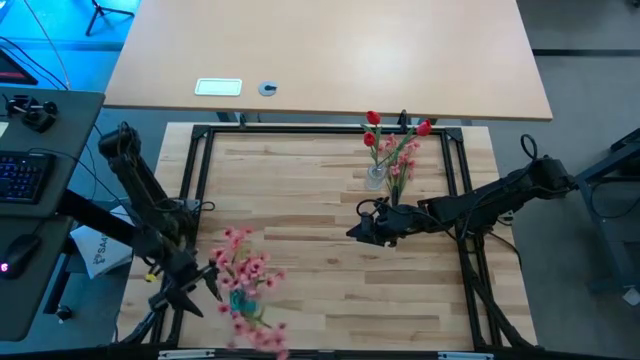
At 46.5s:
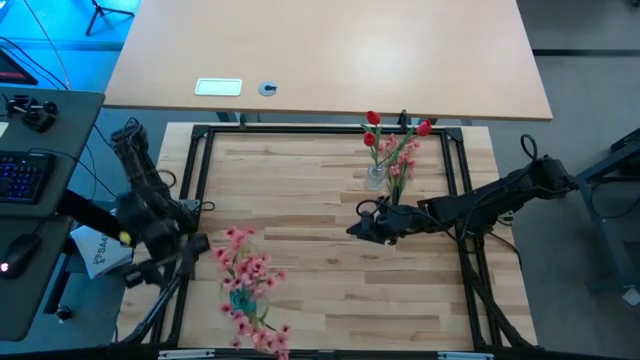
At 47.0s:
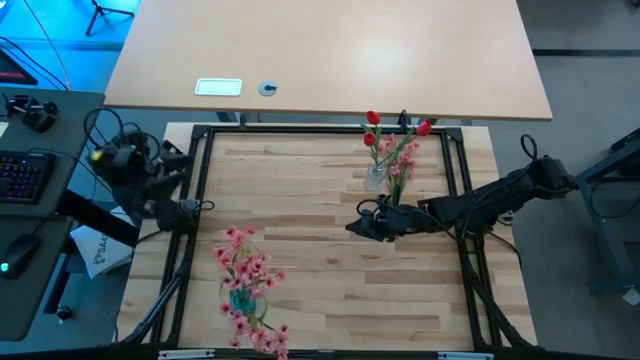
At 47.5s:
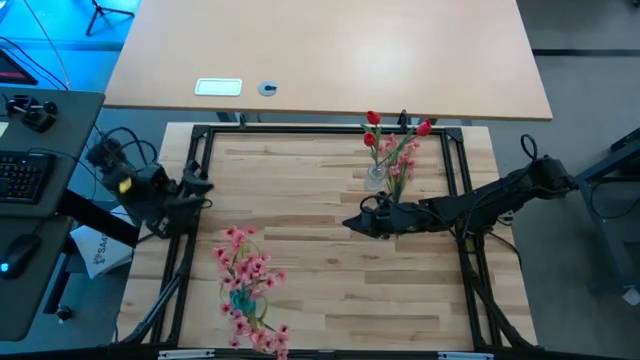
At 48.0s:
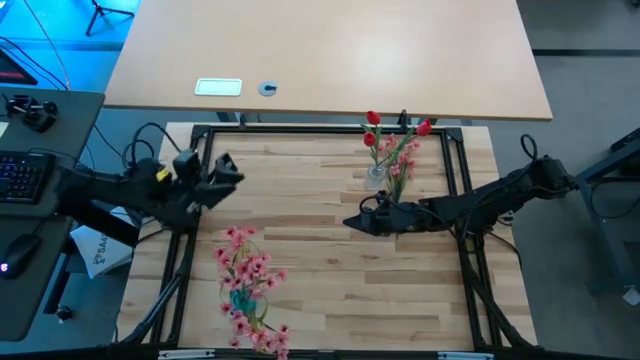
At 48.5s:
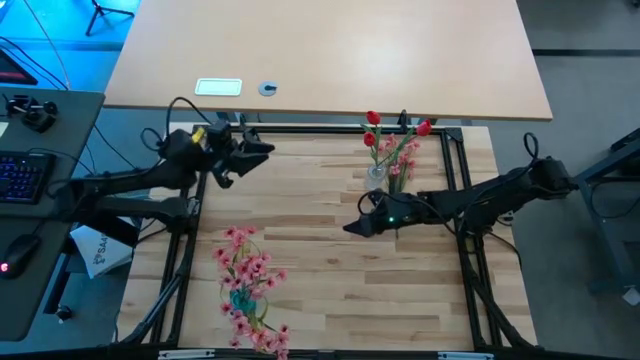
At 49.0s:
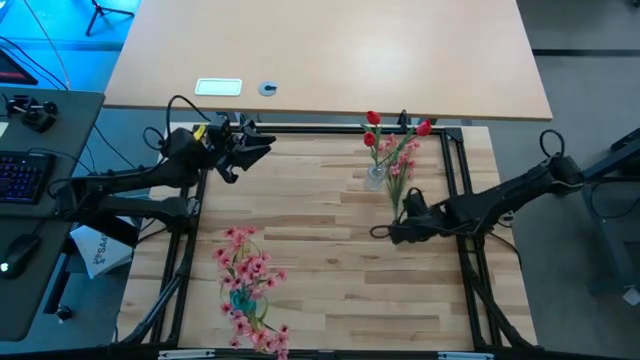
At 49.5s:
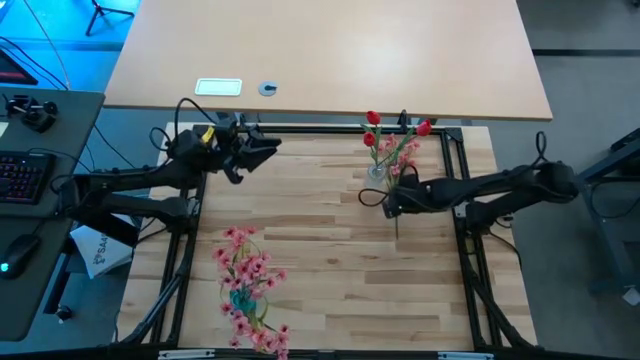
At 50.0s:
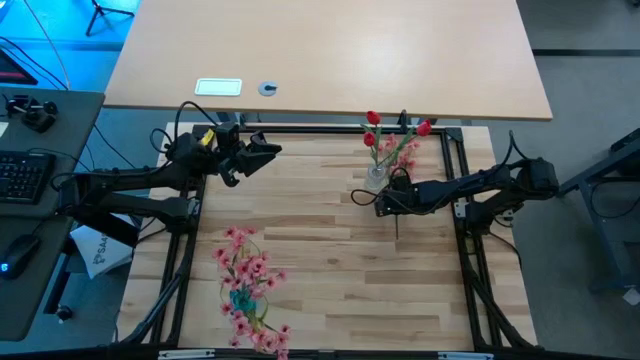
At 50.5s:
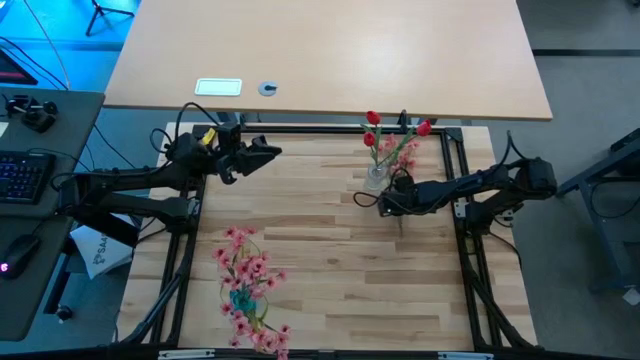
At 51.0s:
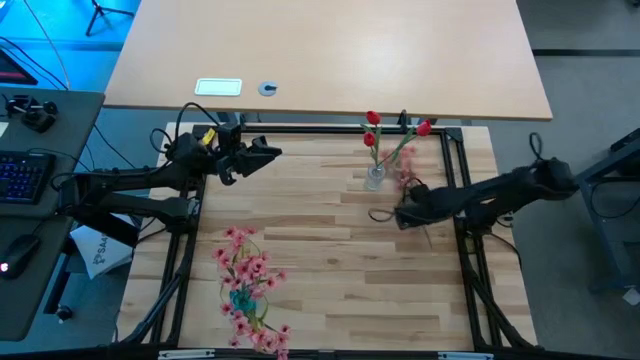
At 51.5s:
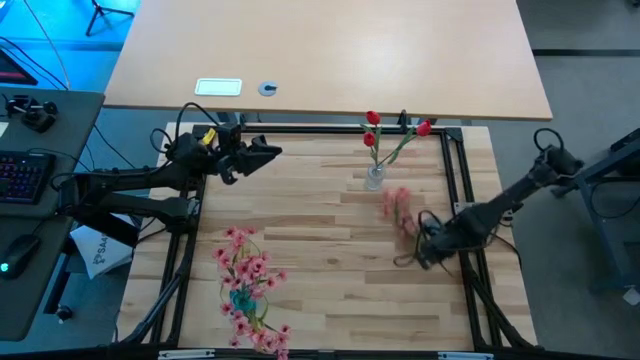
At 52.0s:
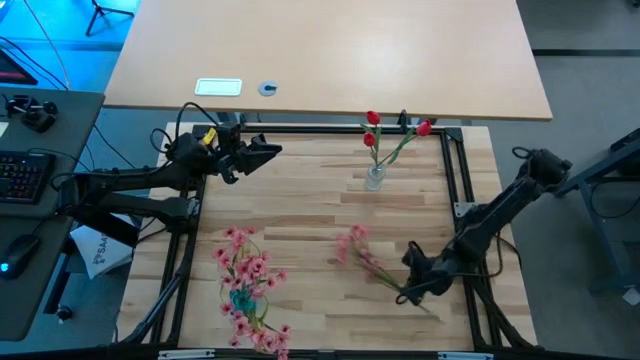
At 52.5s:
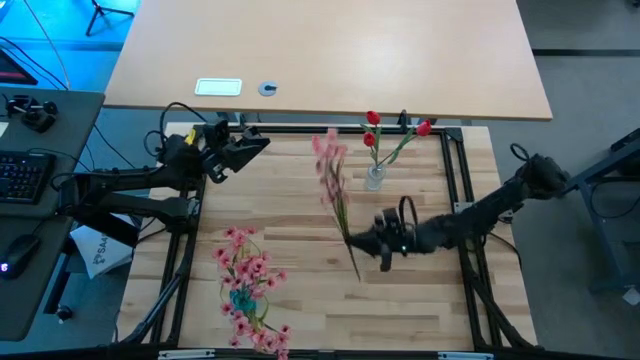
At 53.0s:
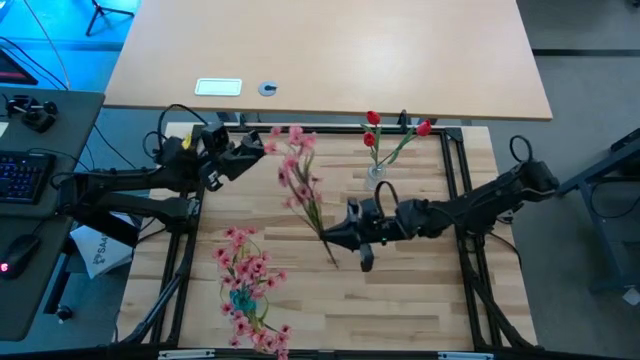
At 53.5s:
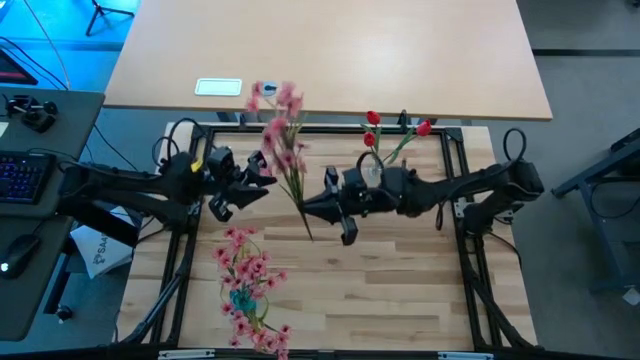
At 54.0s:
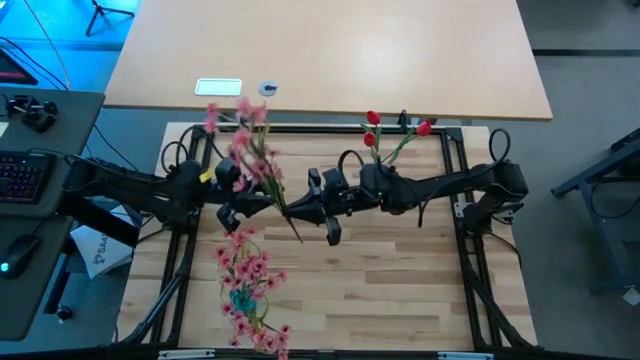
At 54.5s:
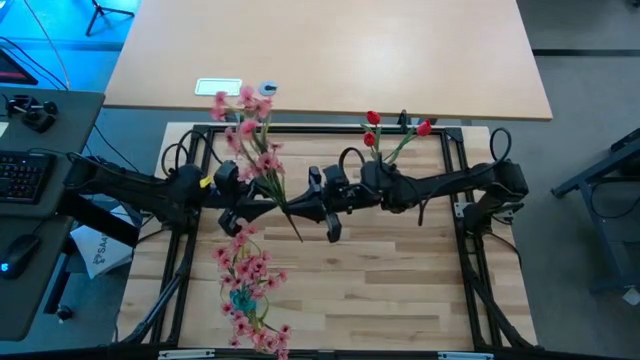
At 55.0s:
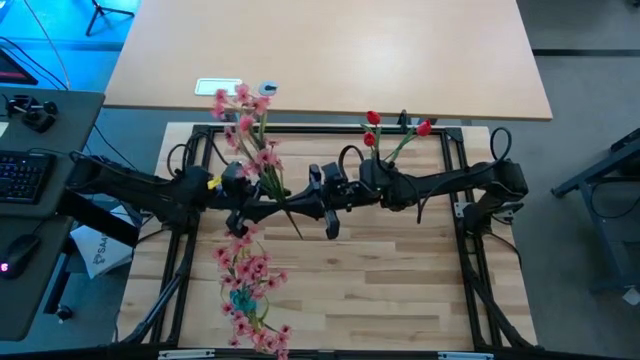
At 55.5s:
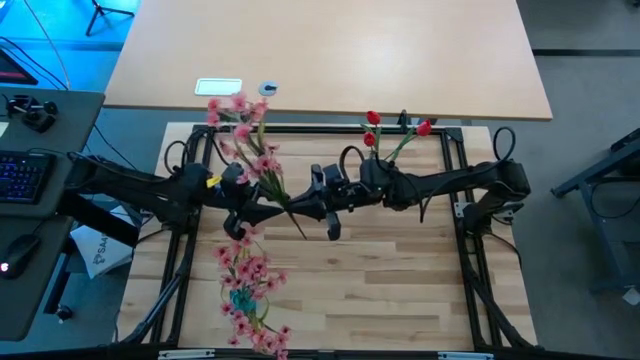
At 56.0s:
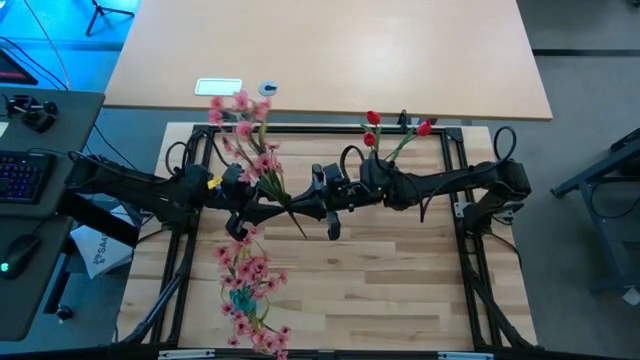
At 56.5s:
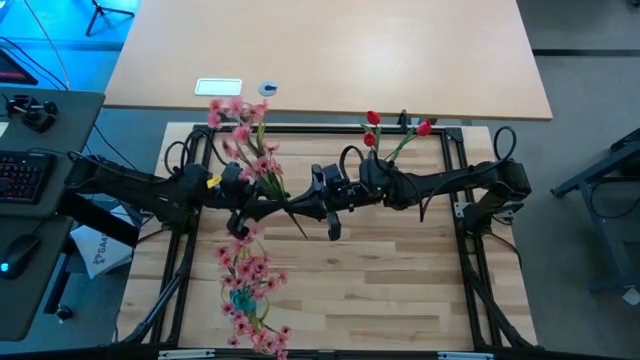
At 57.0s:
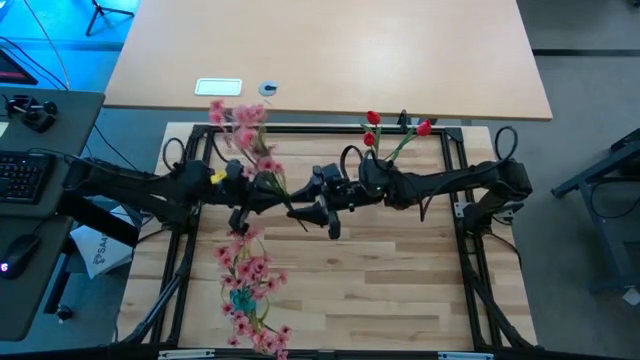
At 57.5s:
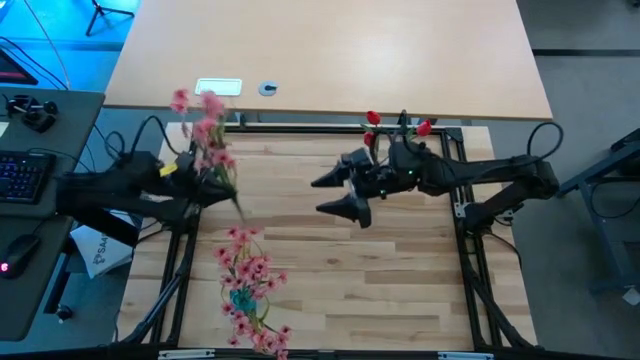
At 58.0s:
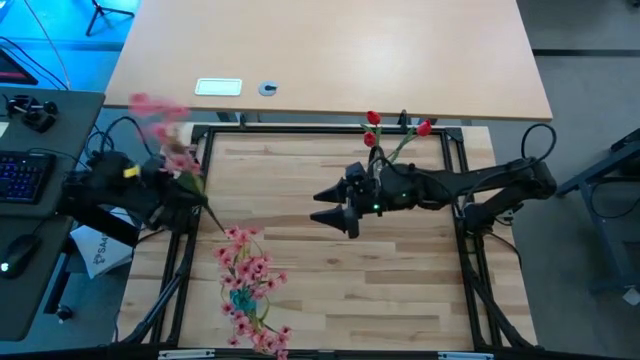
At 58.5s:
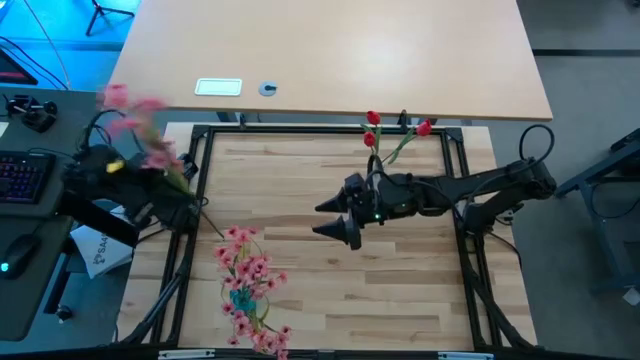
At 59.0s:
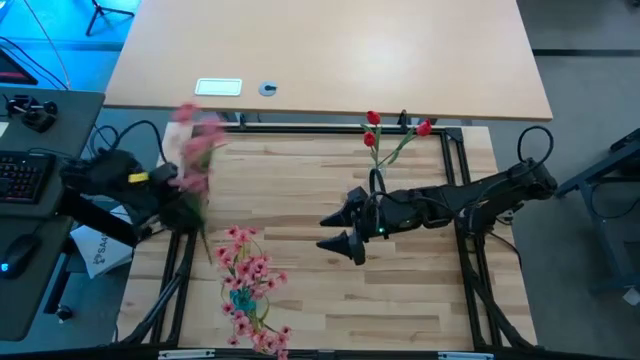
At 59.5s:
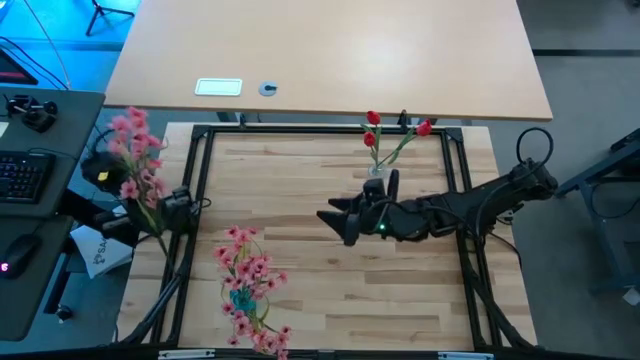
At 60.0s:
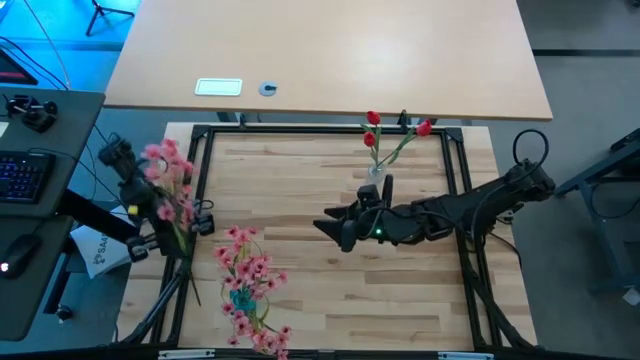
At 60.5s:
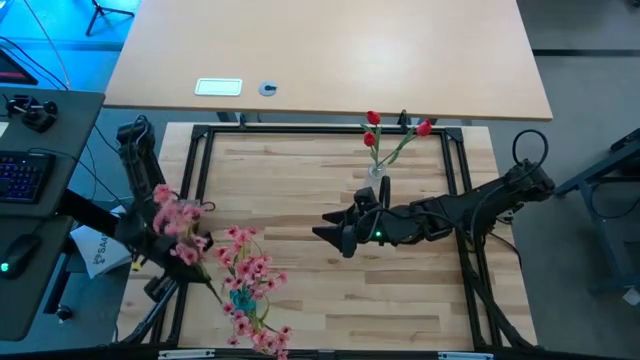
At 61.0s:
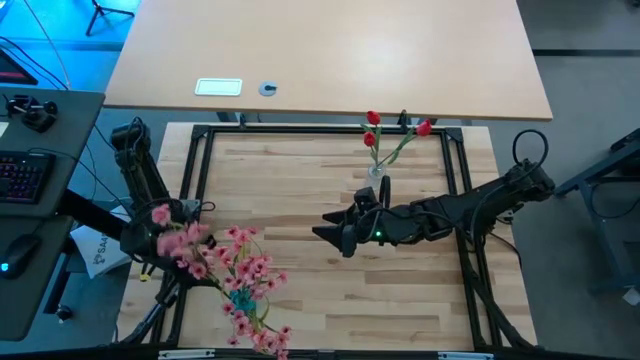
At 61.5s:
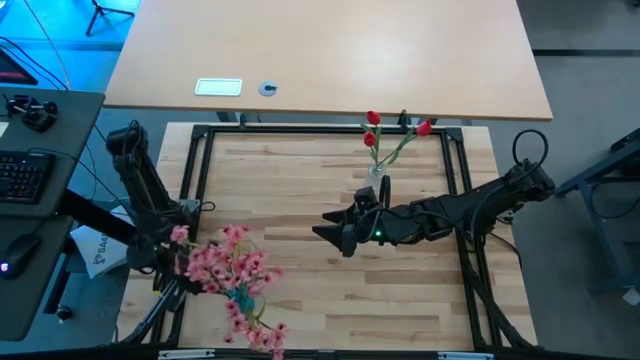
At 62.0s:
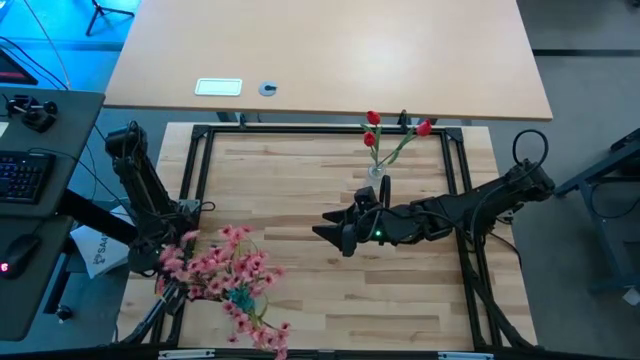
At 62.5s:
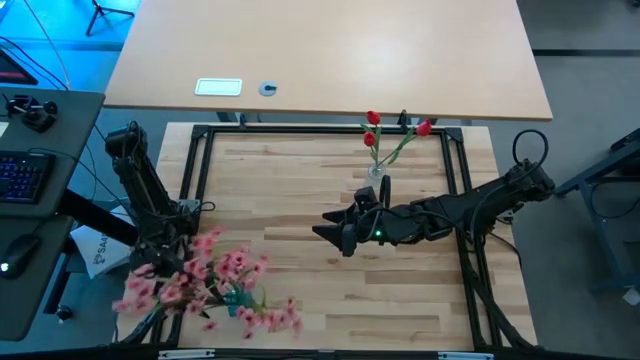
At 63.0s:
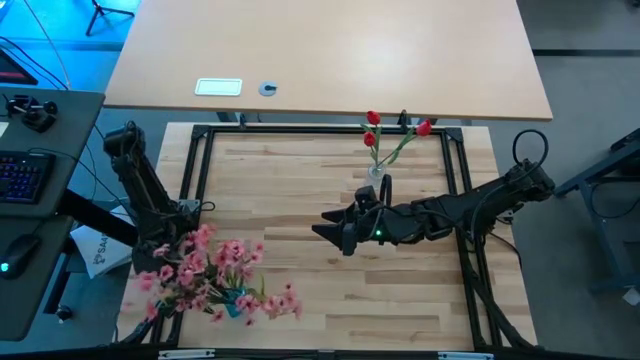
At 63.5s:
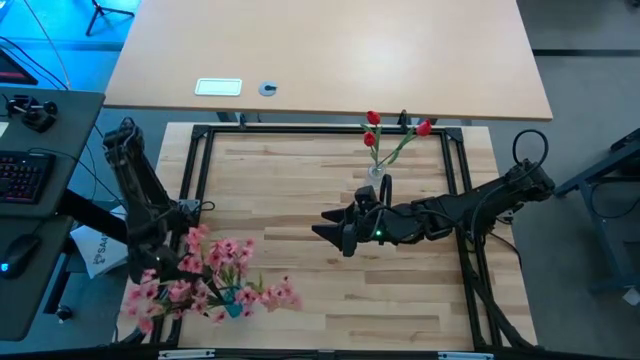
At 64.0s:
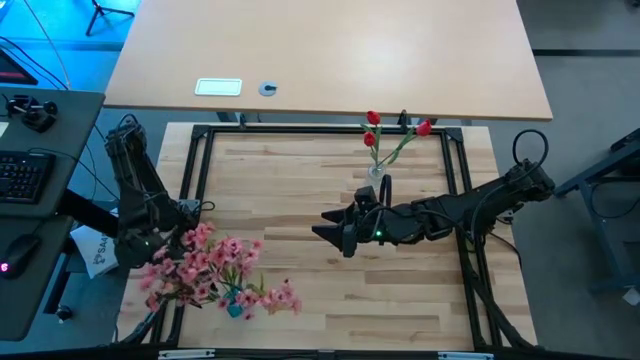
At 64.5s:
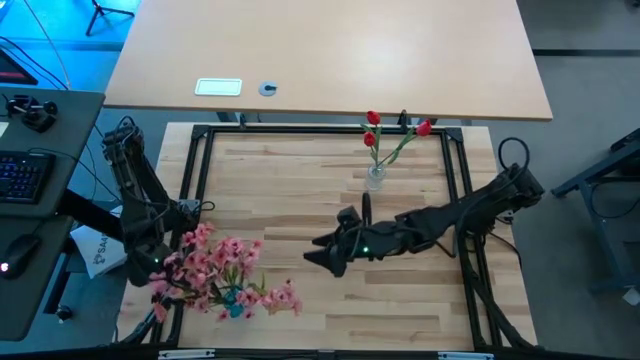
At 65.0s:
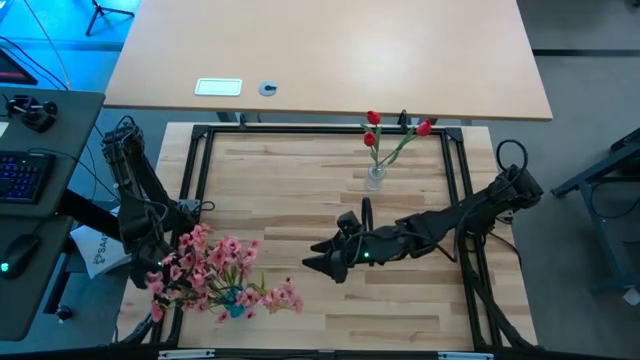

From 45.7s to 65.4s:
Task: Sort flowers into vase by color
Put the pink flower into the blue vase

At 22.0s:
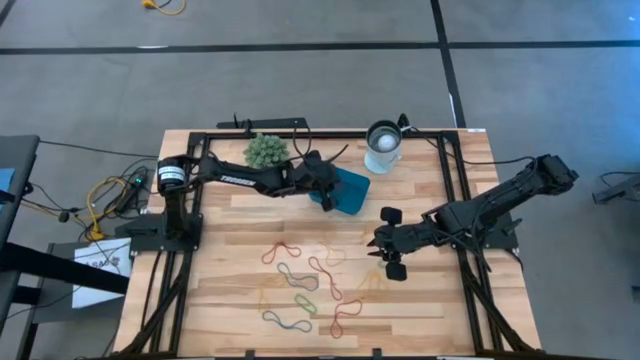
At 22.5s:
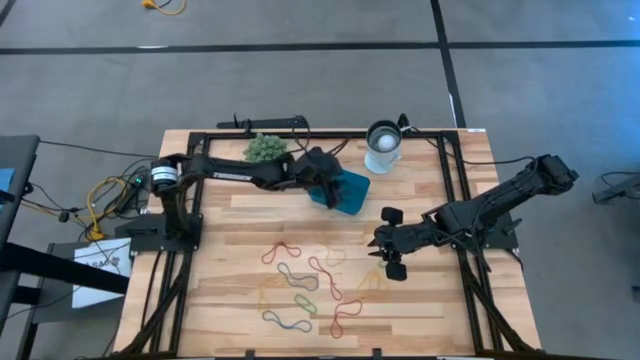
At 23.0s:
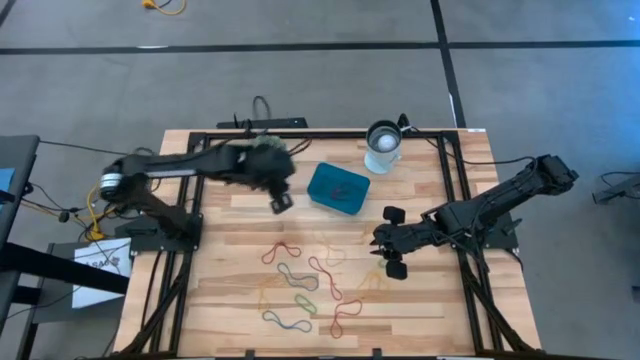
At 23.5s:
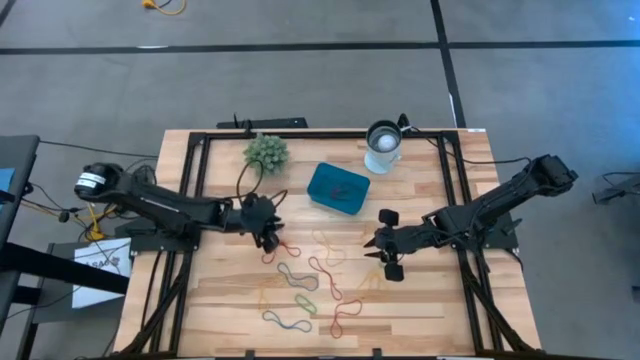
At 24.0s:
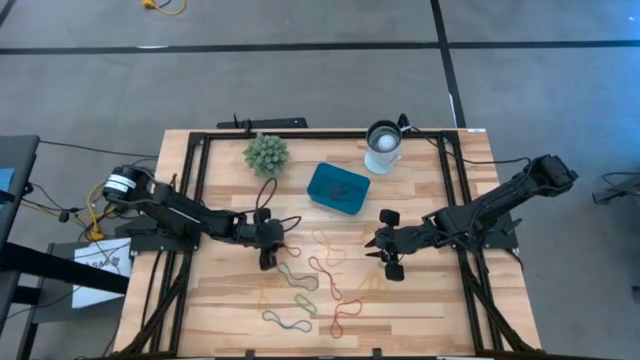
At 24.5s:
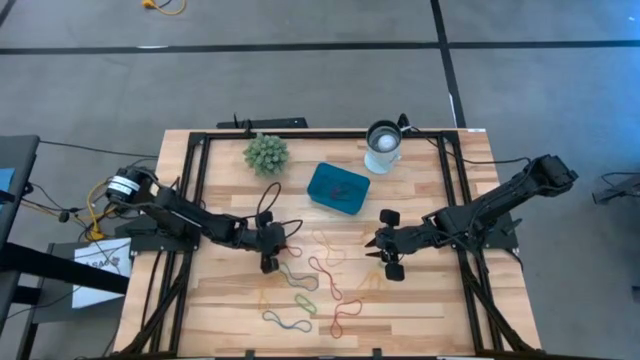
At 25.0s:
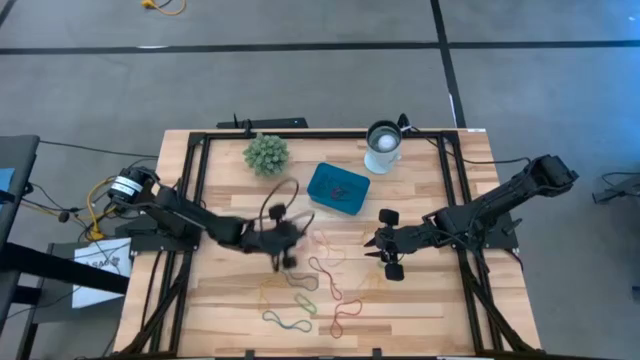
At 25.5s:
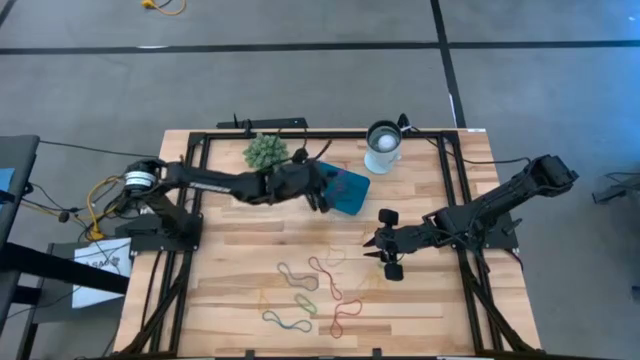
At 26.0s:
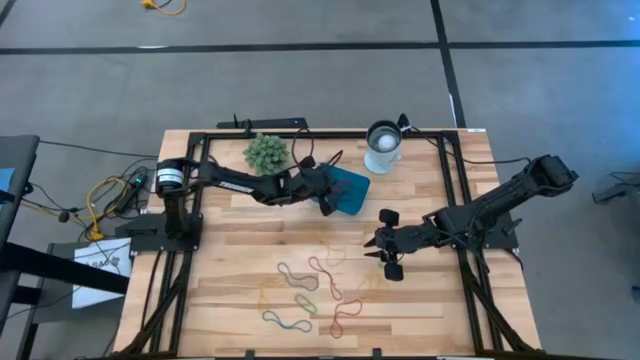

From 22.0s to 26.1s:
Task: Pick and place items into bin
Put the red rubber band into the blue bin
